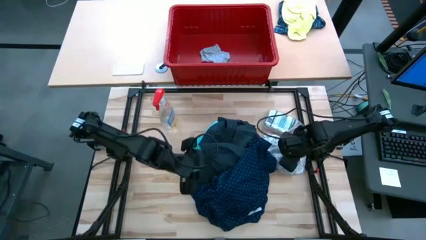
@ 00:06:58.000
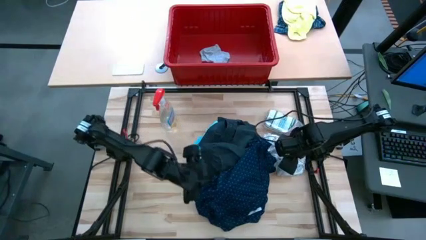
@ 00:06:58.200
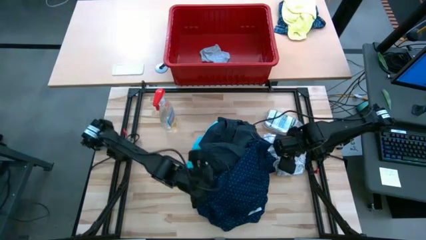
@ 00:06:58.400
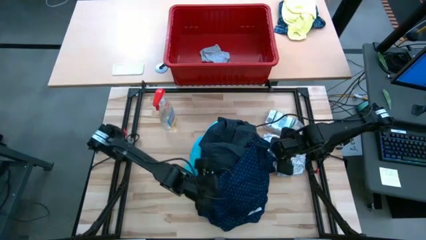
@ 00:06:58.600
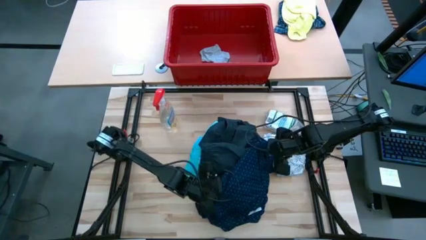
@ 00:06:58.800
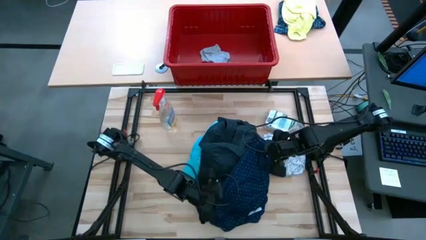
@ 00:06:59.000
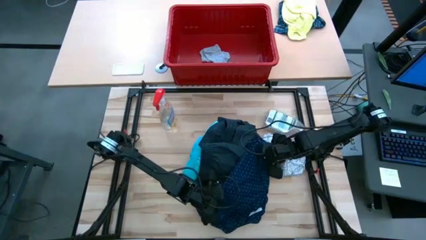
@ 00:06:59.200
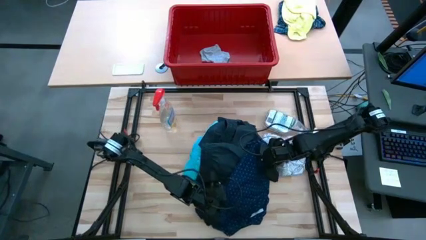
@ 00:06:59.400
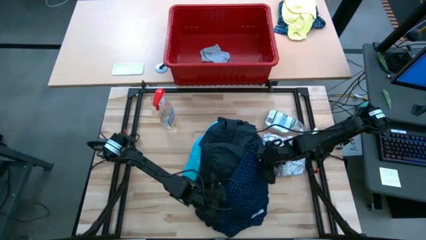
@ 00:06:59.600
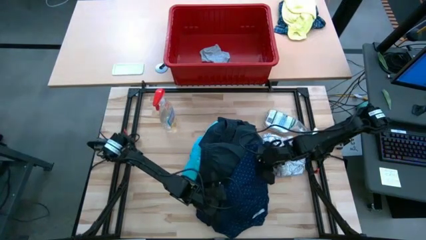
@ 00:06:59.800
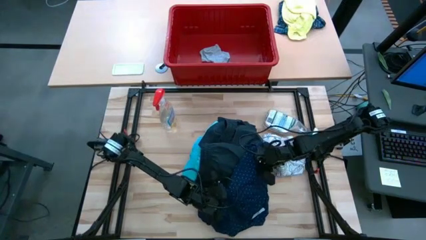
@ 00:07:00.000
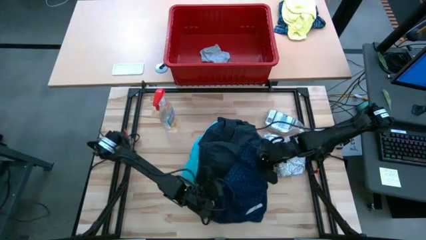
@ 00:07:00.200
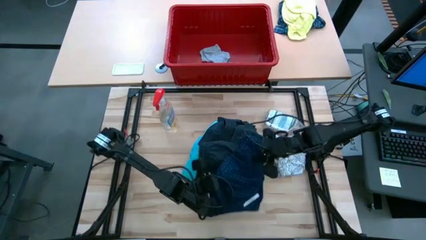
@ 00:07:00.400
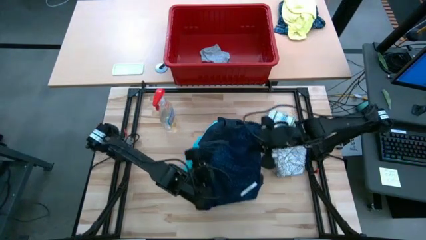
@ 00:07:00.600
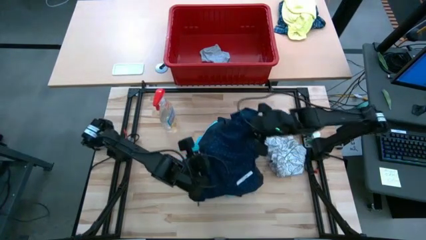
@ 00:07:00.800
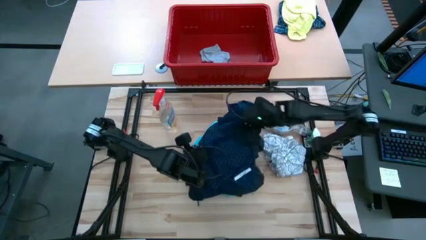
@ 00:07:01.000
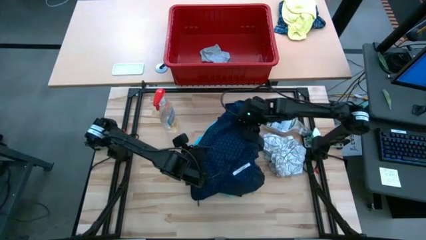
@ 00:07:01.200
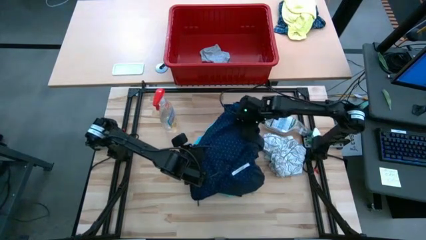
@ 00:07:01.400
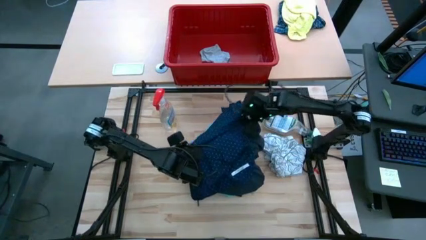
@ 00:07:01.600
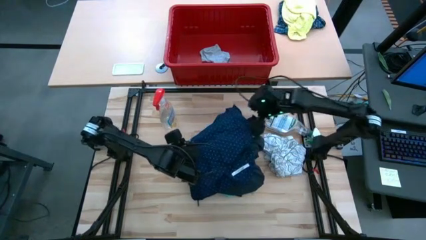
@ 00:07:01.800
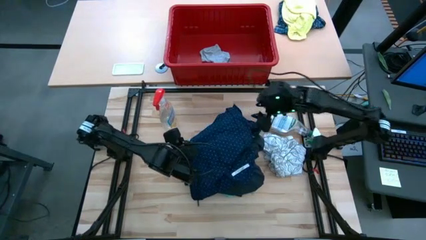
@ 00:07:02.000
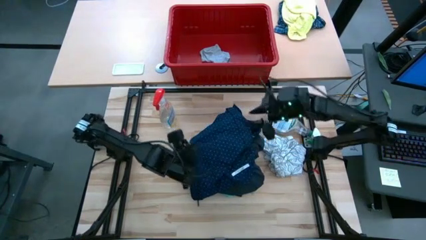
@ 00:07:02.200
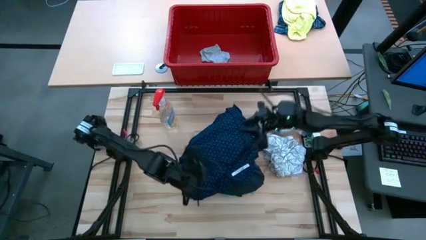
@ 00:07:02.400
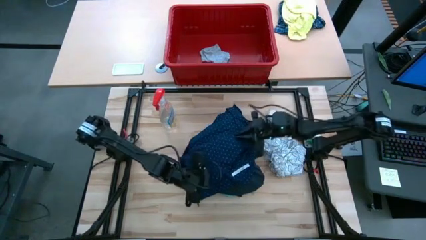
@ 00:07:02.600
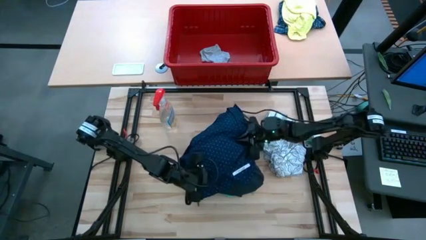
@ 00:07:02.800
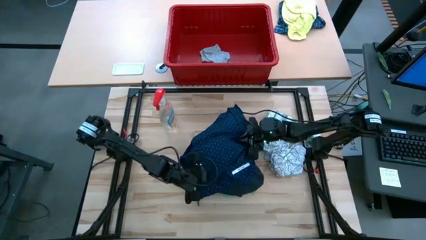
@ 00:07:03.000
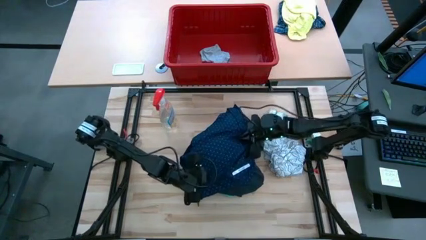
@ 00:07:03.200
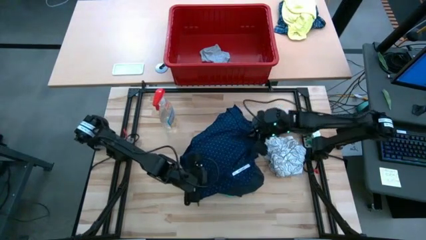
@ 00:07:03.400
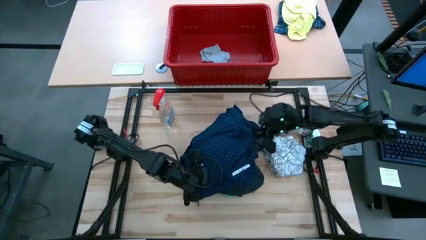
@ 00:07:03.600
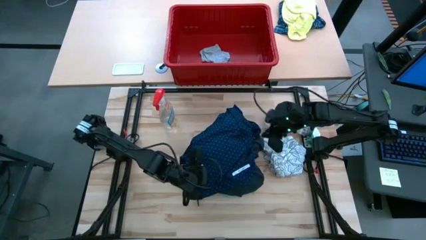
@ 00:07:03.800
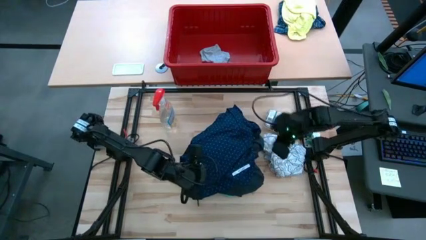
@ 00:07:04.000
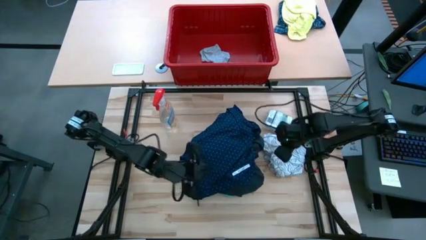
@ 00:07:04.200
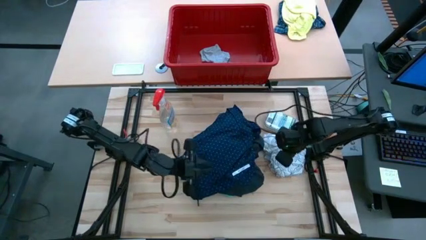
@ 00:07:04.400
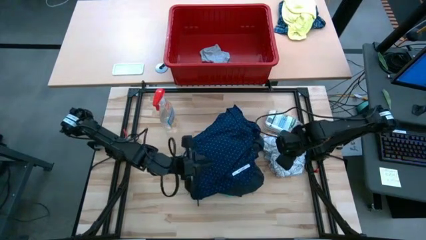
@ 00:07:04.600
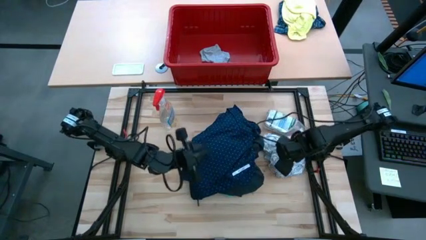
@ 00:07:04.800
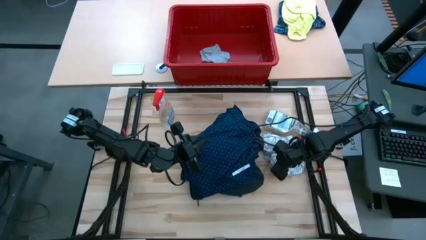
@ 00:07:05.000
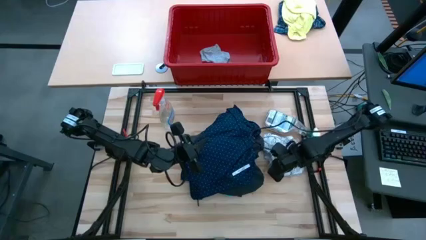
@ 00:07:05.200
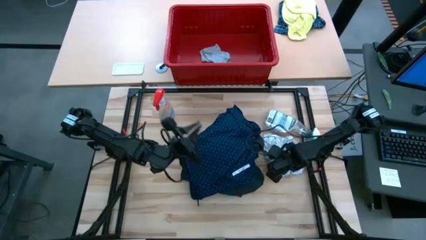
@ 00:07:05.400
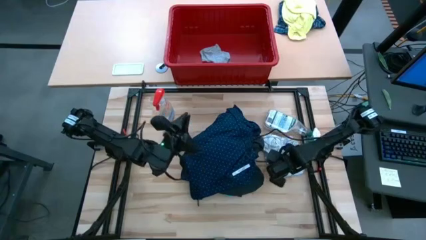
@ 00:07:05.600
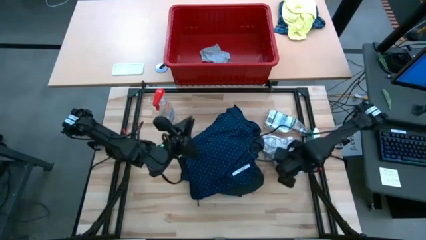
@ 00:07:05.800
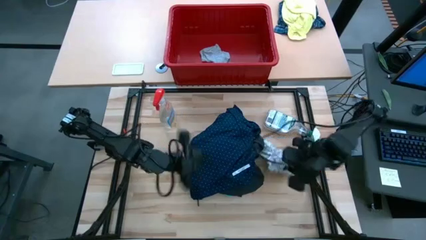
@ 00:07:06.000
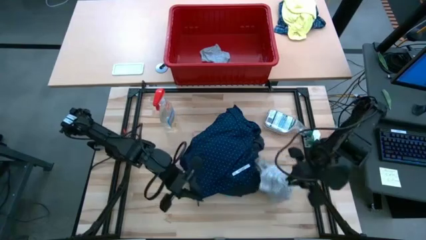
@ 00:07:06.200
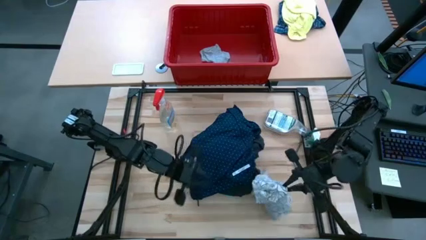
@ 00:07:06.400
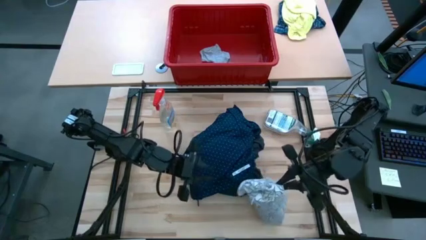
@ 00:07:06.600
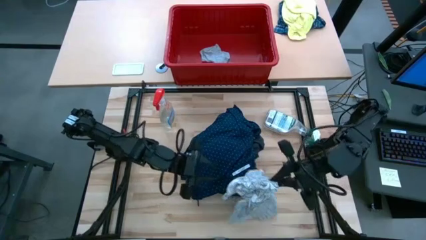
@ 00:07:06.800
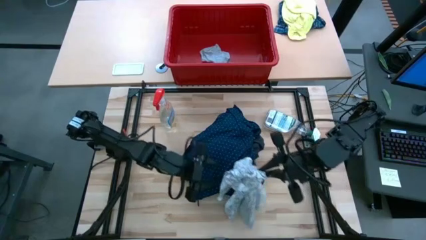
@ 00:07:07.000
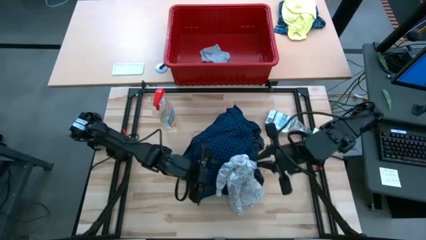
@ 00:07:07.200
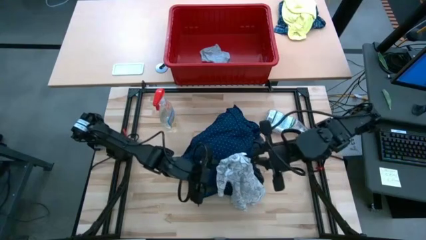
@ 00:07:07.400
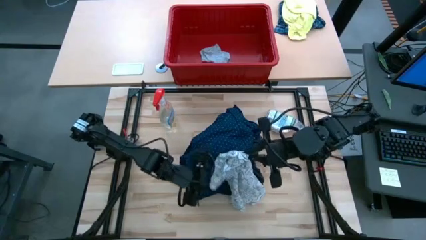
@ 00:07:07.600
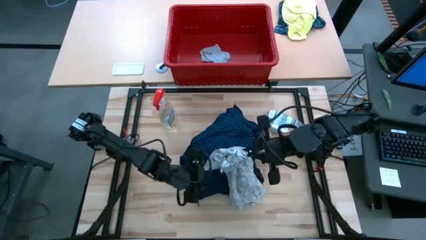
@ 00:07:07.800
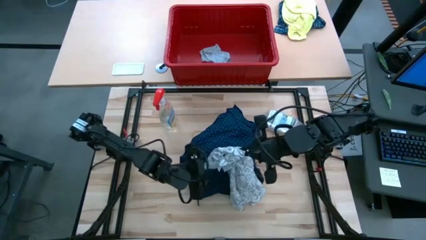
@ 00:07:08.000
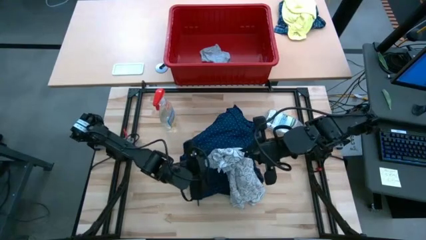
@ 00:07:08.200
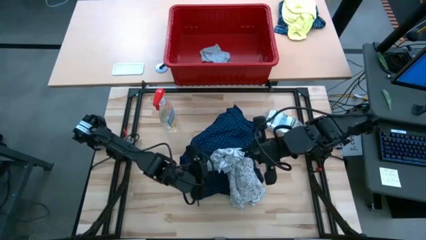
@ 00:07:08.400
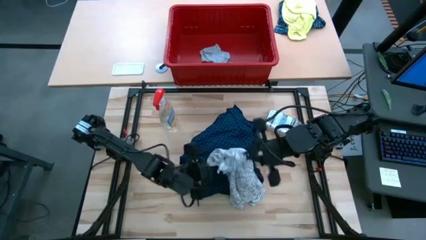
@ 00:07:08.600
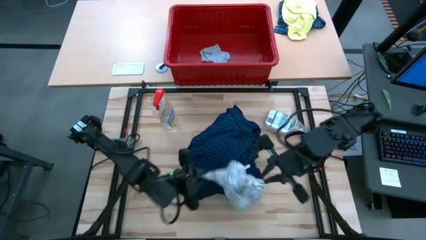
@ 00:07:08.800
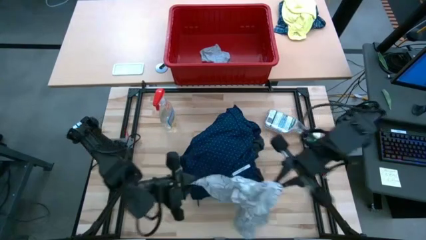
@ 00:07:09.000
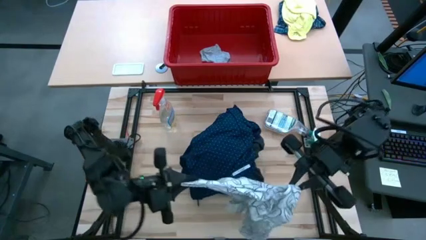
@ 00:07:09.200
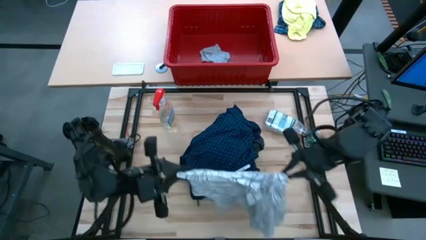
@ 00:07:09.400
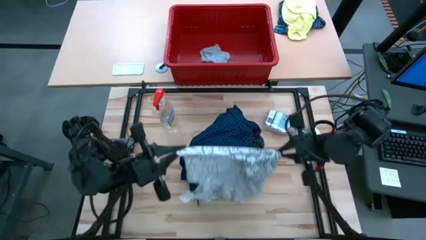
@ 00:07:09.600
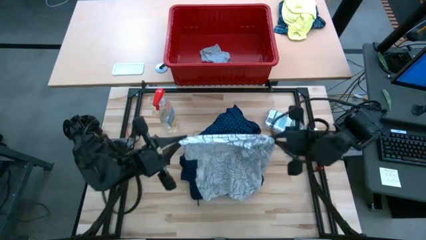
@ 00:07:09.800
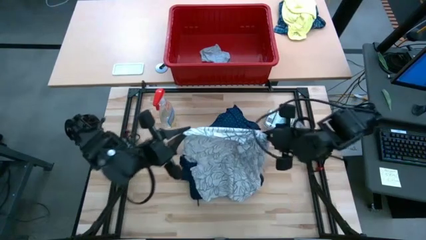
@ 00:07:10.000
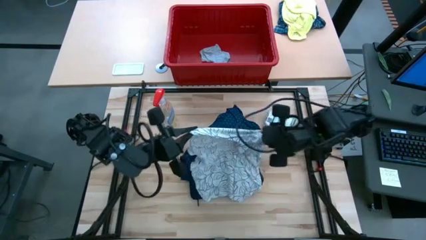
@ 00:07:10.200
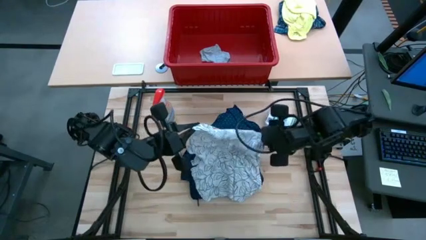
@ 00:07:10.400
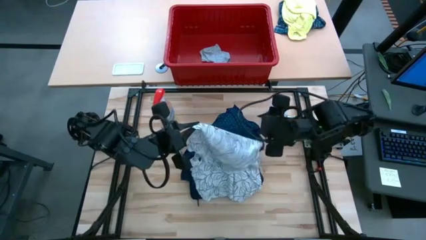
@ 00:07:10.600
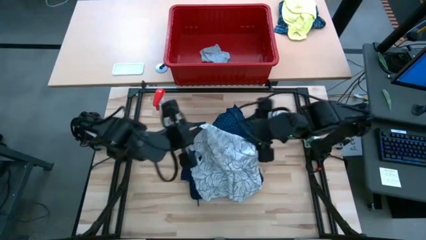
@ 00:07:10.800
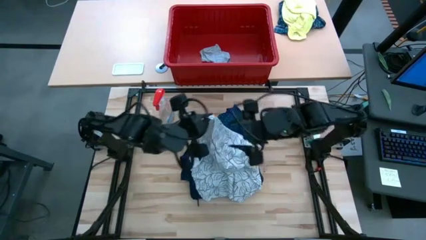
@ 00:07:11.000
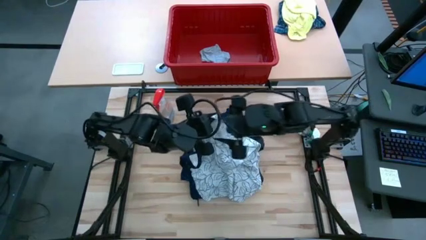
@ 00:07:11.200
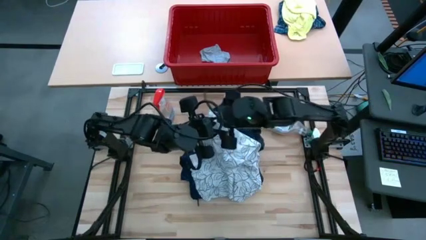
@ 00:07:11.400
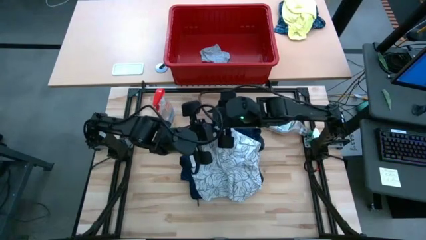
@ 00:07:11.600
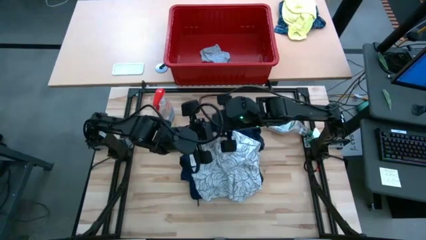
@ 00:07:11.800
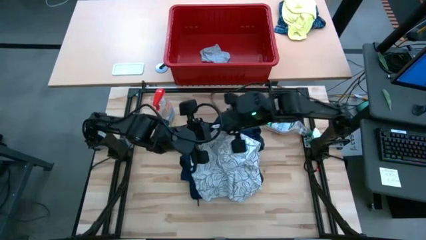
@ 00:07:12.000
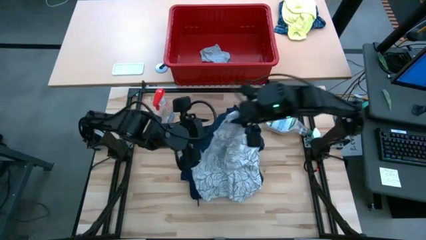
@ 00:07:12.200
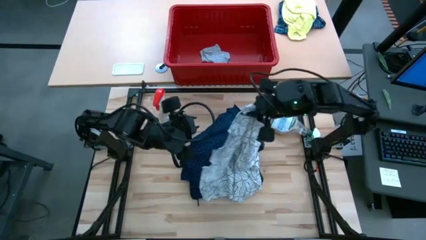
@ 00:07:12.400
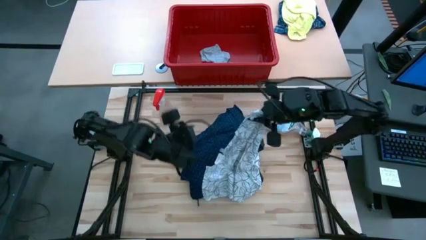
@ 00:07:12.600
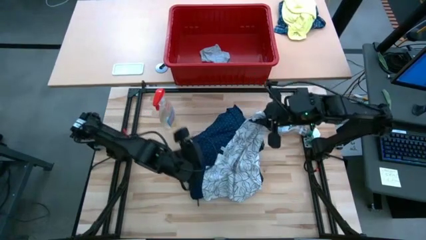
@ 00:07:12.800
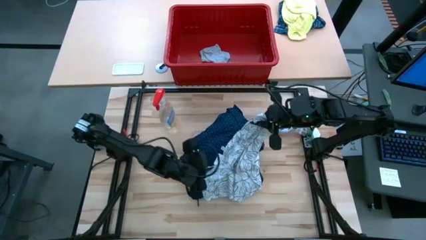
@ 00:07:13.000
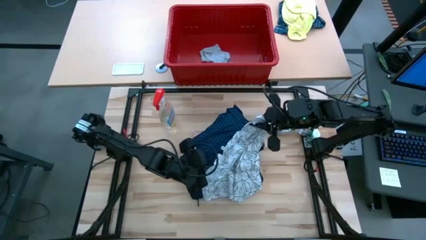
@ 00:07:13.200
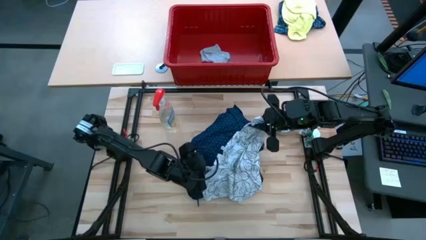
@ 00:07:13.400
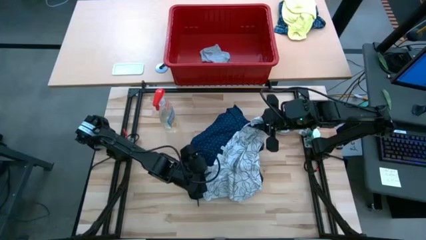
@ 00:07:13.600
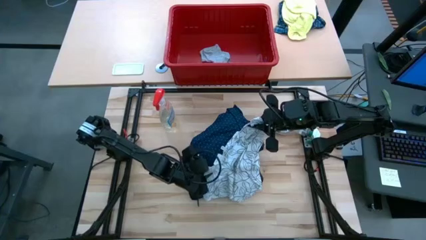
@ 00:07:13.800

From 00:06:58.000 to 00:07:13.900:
Task: Fold Laundry from Bin
Fold the white floral shirt
